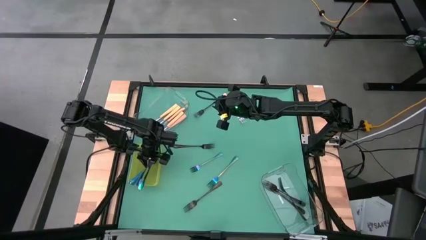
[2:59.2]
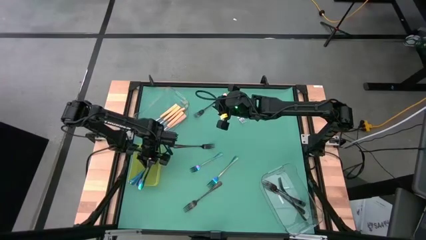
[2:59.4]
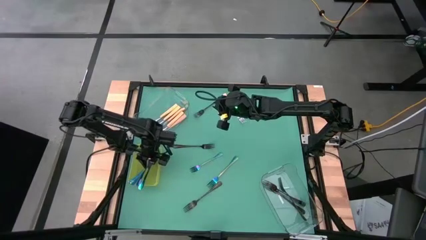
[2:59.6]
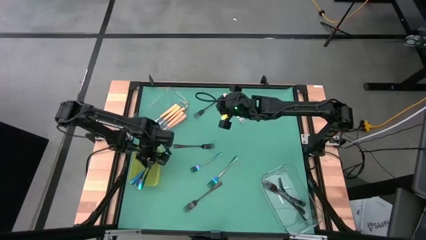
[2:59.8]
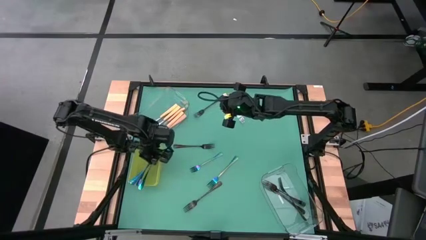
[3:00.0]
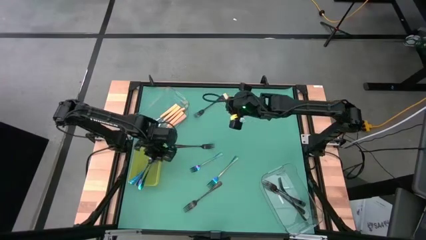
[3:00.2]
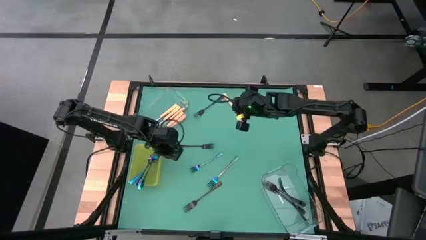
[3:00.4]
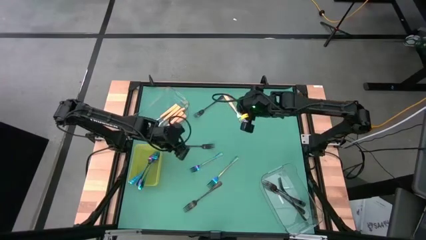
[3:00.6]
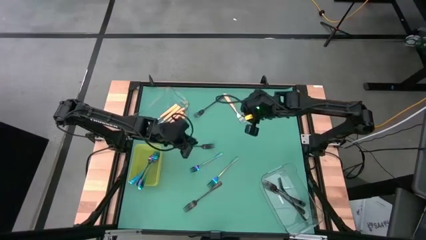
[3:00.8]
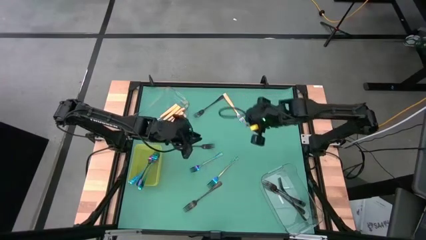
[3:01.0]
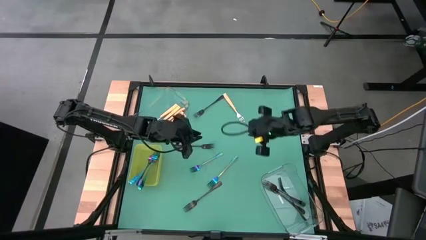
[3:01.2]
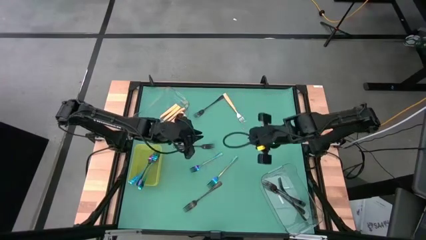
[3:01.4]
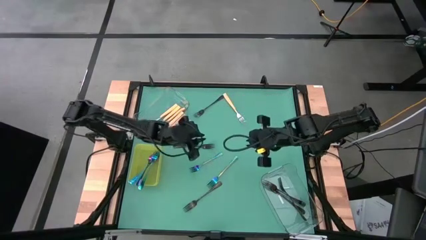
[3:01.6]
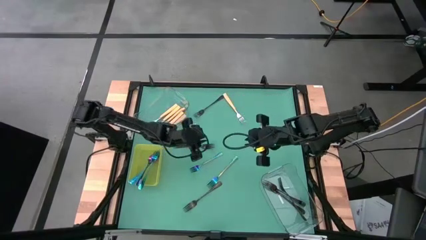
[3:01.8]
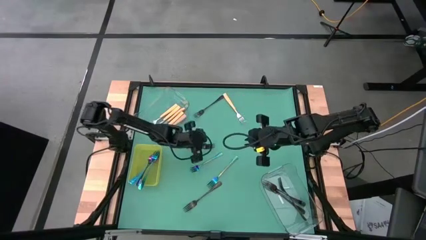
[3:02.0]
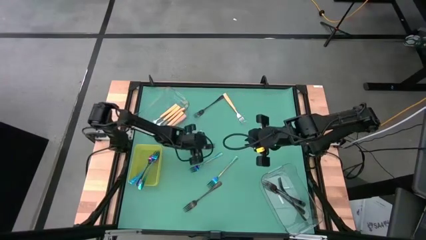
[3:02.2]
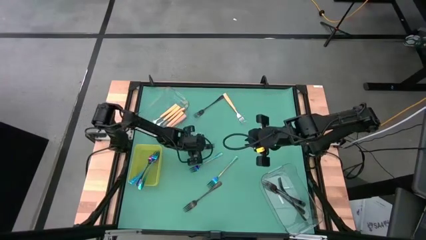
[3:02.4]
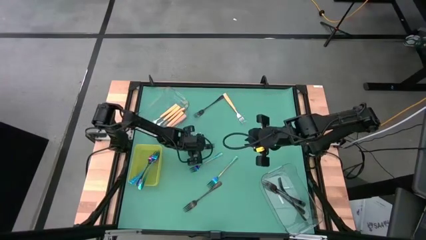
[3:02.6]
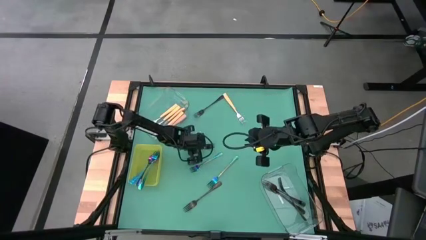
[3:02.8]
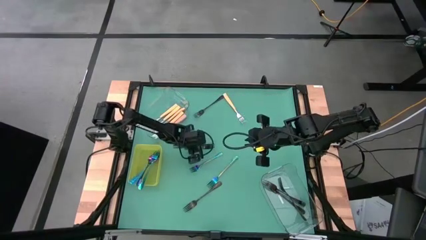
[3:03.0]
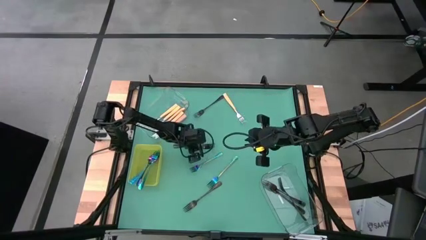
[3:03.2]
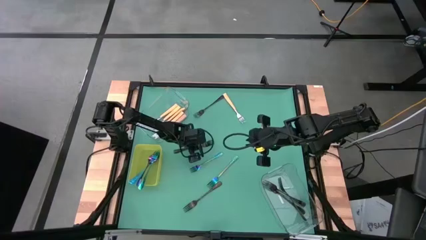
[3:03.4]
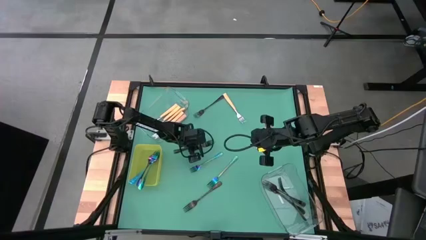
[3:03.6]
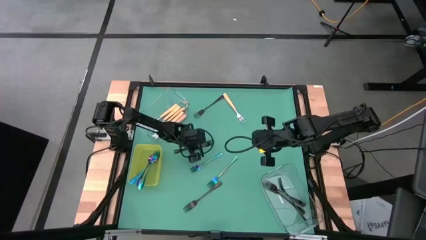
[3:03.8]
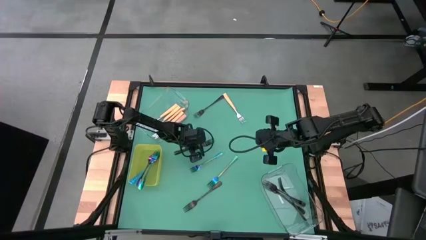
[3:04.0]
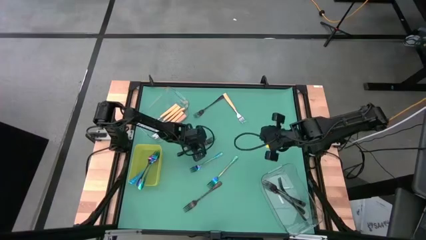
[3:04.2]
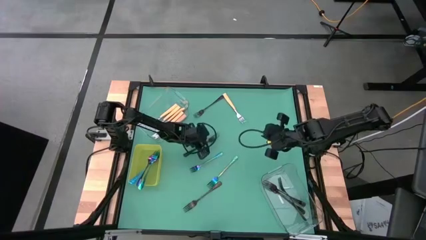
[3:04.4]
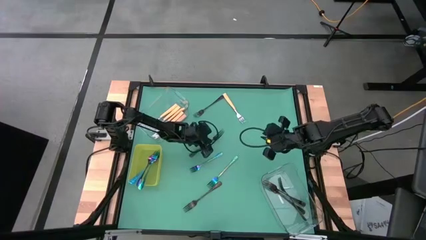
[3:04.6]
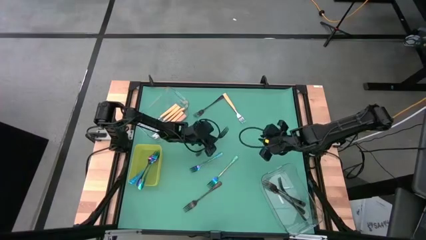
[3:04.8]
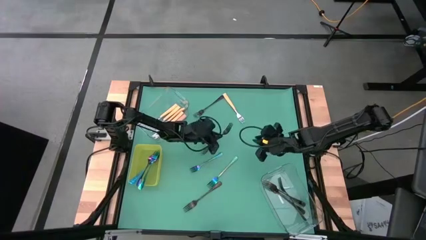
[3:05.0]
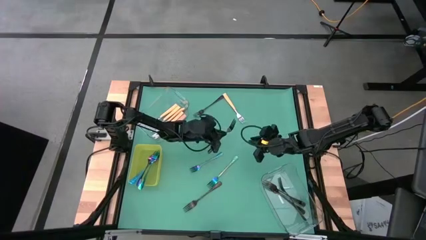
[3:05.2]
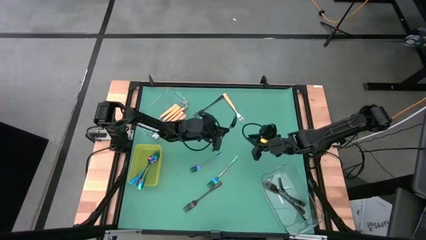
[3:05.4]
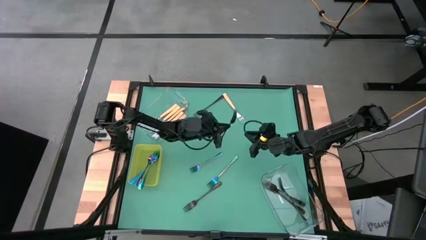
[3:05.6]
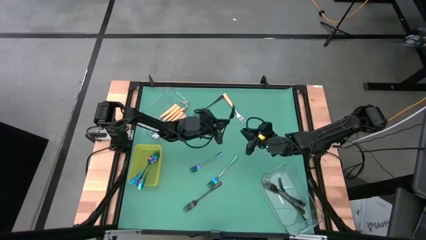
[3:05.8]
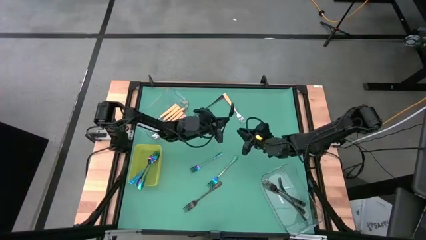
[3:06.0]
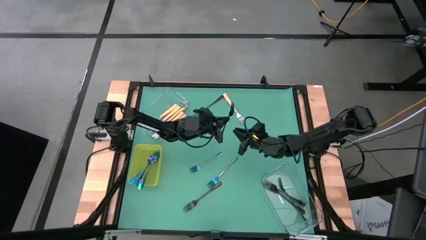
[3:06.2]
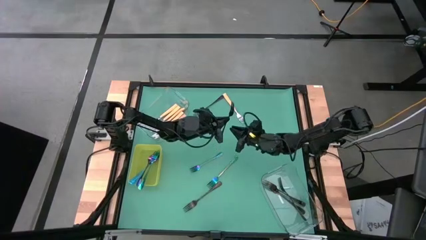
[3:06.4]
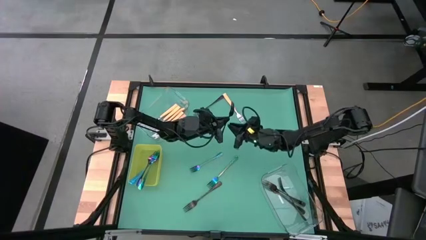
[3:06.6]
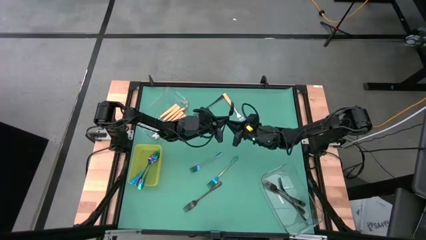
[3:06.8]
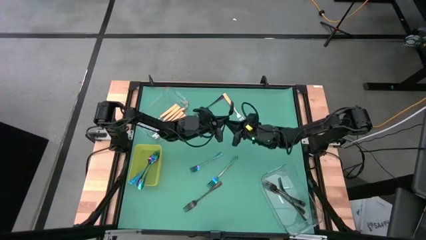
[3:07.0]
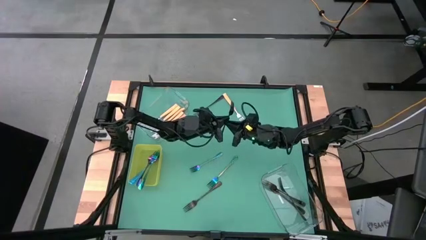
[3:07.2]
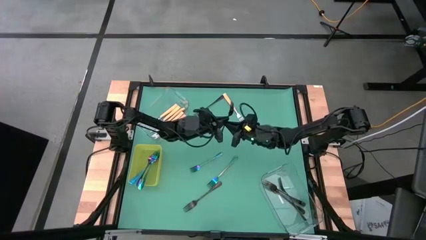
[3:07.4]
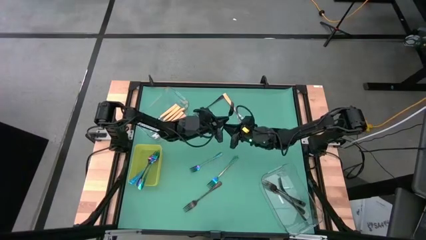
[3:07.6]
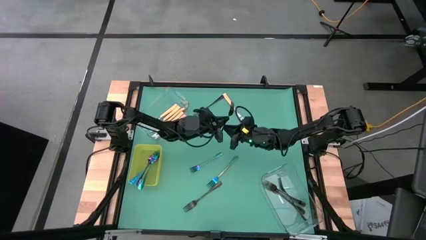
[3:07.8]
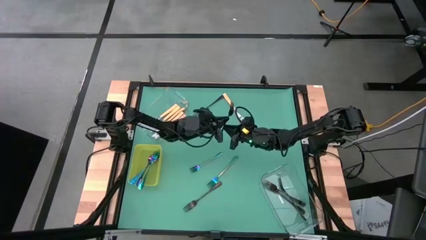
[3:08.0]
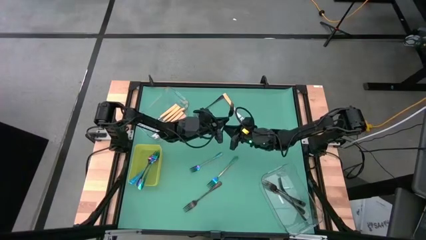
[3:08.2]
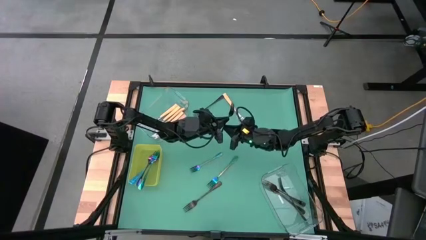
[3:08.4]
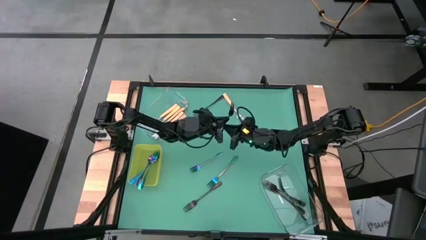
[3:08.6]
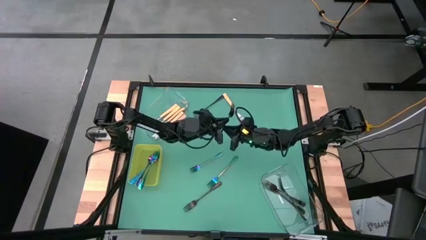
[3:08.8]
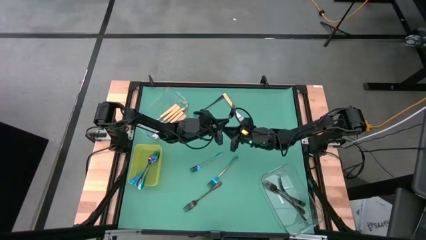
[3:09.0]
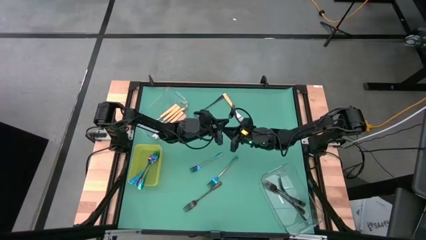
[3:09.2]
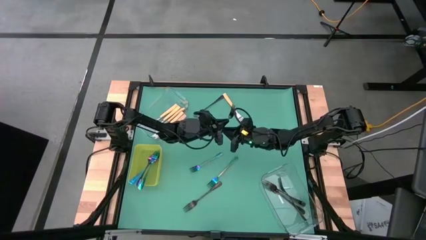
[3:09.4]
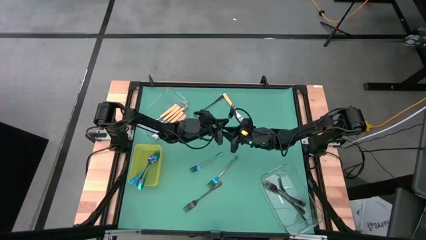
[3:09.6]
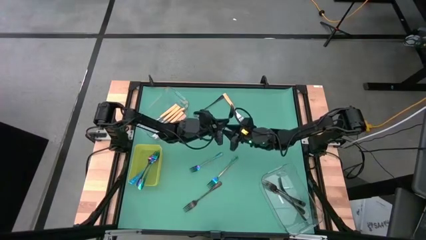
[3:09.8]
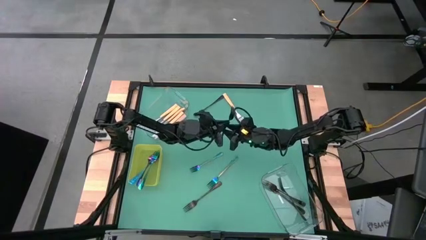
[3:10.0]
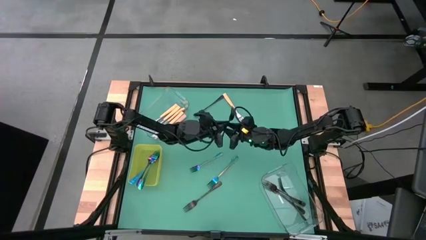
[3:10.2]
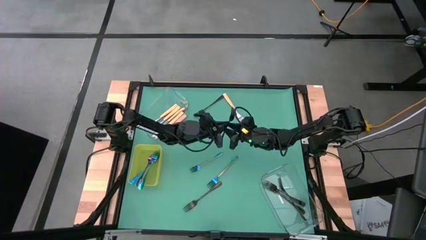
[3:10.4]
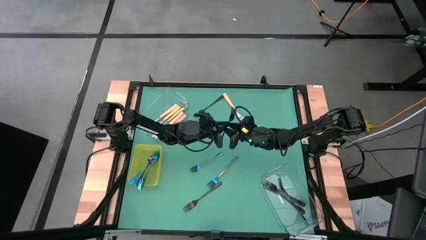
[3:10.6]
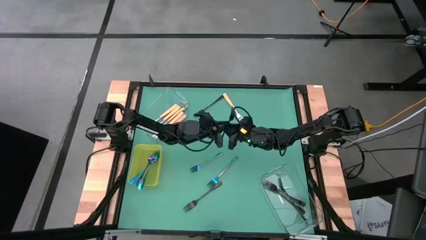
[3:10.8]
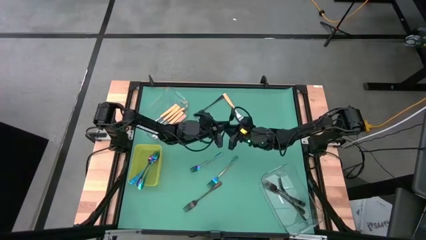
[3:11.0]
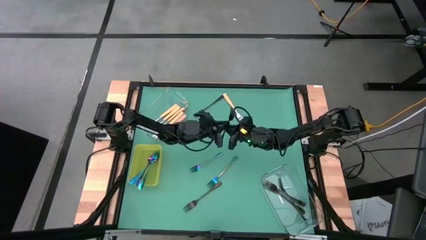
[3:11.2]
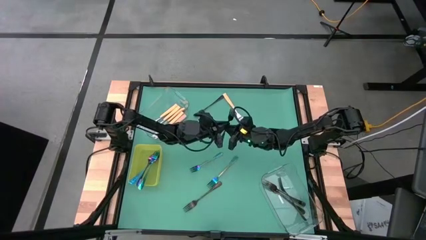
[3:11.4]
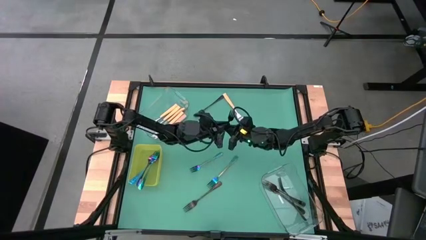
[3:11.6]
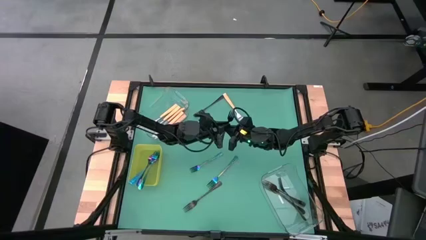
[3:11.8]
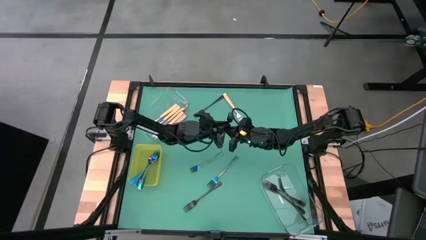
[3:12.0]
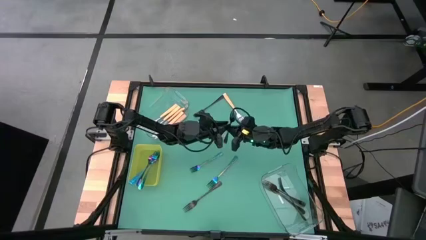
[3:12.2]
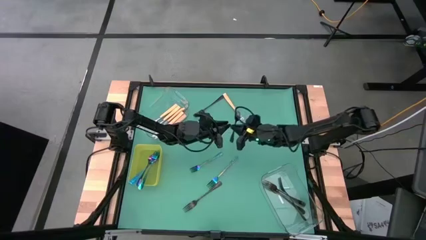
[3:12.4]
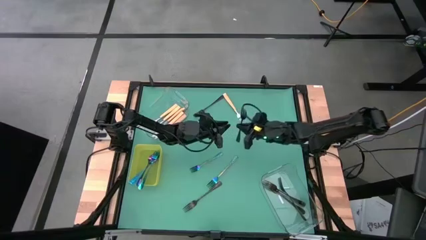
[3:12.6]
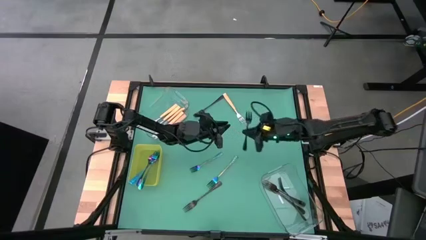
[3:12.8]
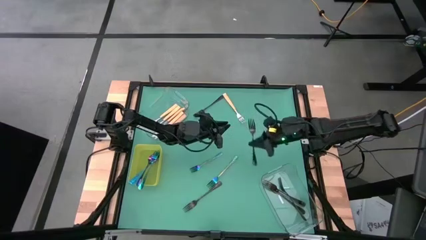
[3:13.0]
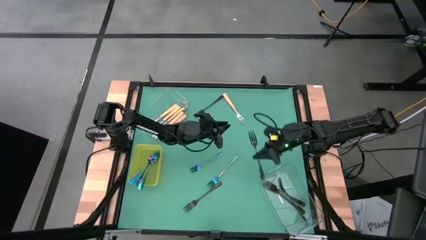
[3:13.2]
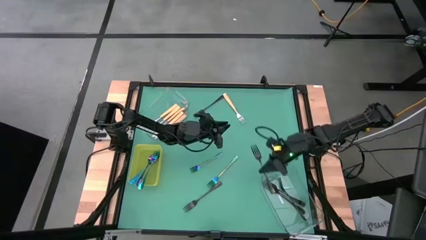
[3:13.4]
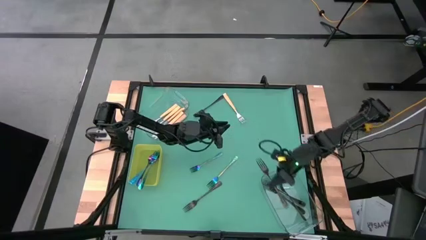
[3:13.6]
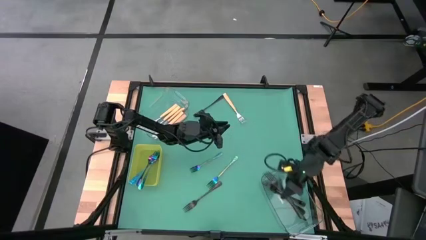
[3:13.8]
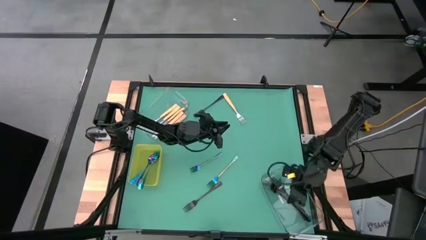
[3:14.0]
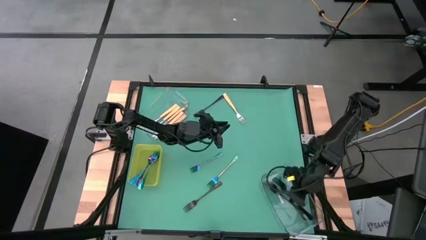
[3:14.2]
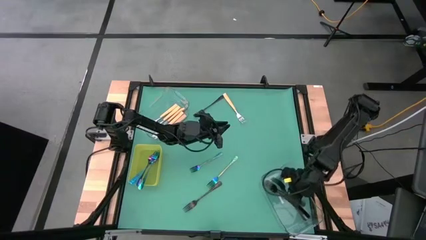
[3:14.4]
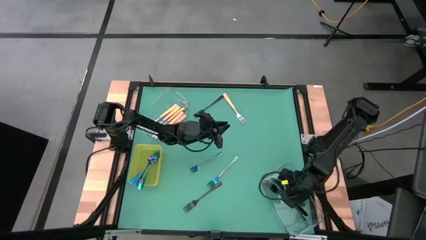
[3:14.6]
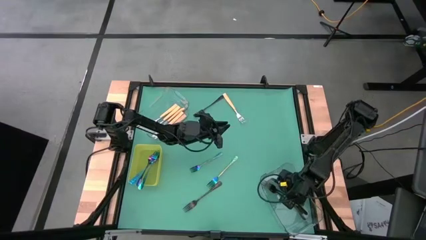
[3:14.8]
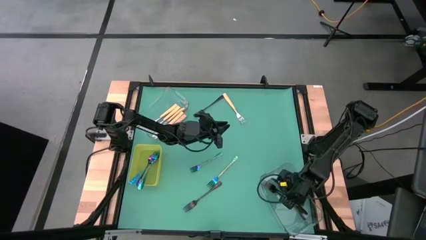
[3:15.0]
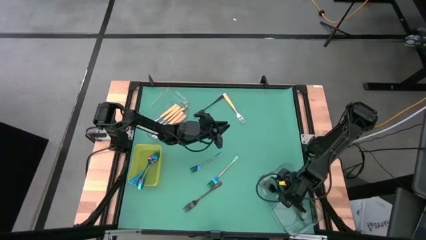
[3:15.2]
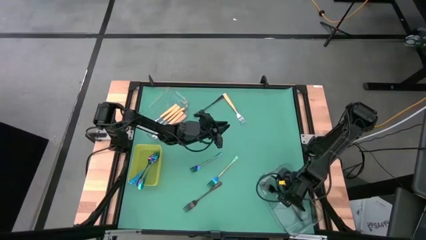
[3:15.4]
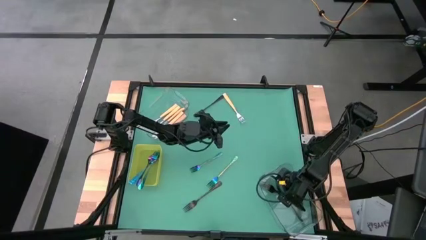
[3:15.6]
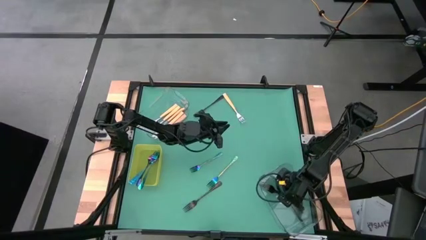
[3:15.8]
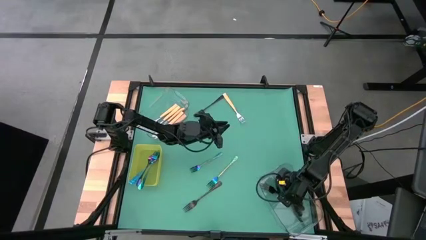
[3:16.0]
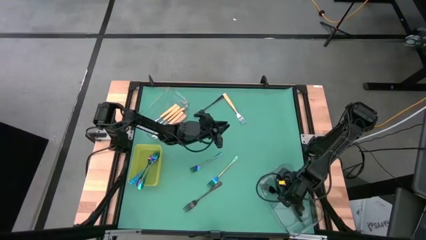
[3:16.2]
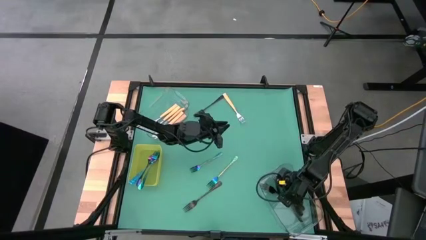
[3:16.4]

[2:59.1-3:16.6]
Task: Sort silverware by color (type)
Put the black fork in the bottom transparent bin
